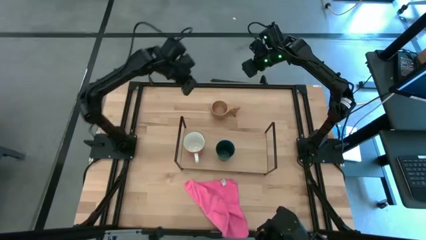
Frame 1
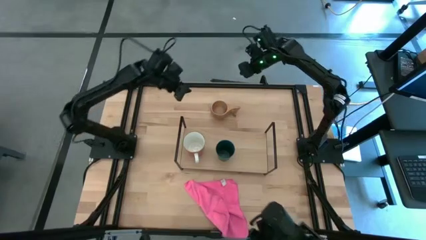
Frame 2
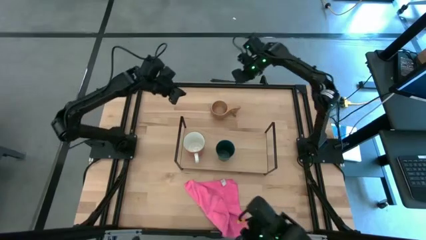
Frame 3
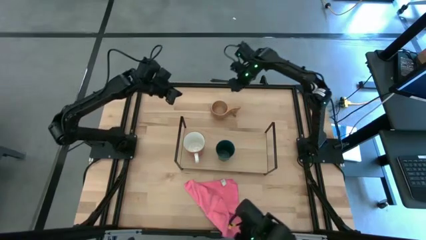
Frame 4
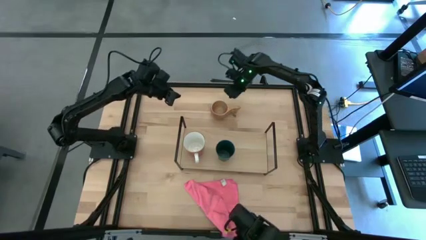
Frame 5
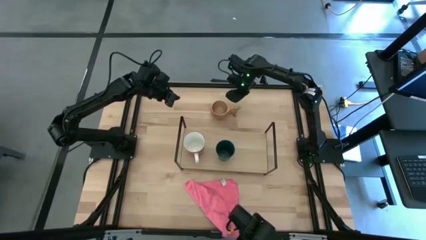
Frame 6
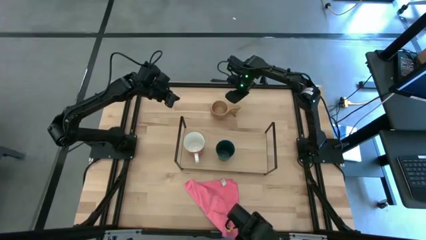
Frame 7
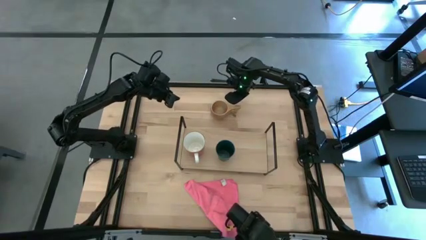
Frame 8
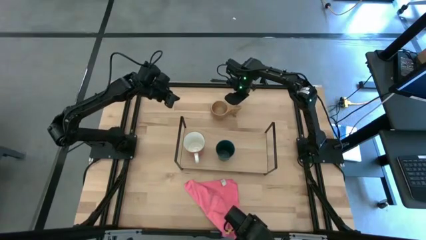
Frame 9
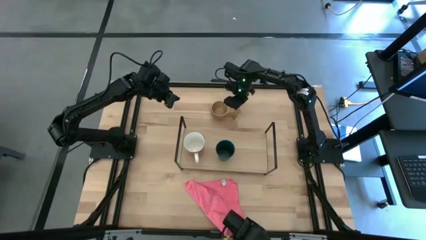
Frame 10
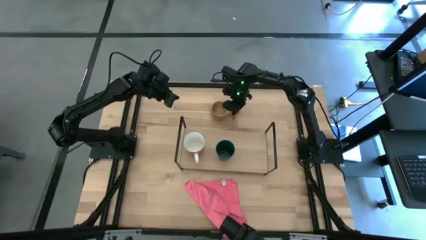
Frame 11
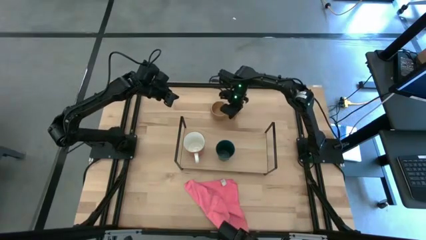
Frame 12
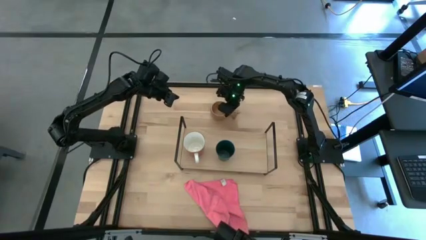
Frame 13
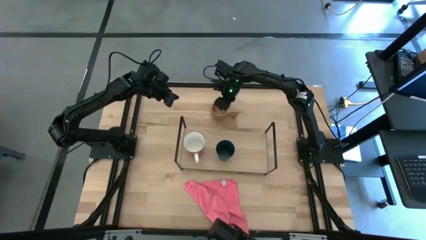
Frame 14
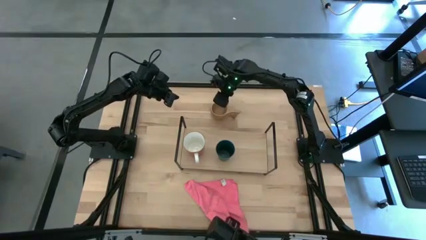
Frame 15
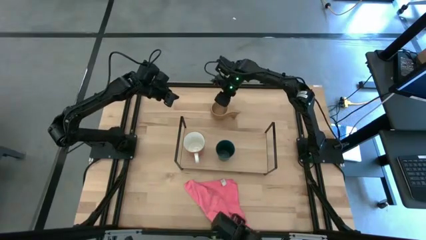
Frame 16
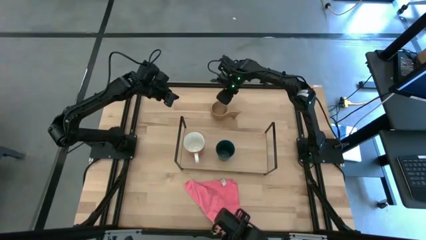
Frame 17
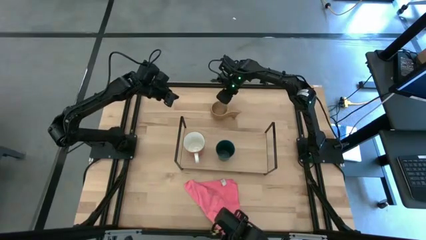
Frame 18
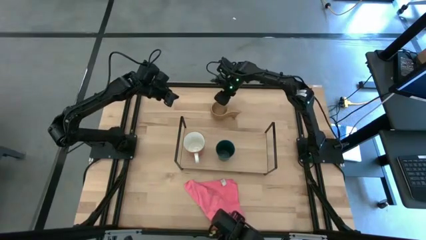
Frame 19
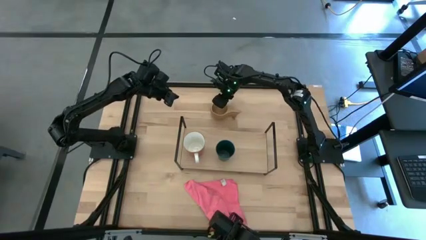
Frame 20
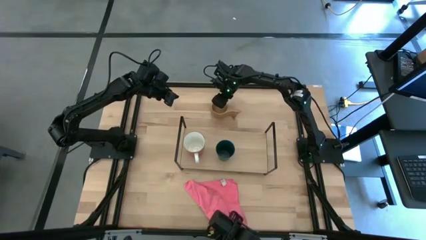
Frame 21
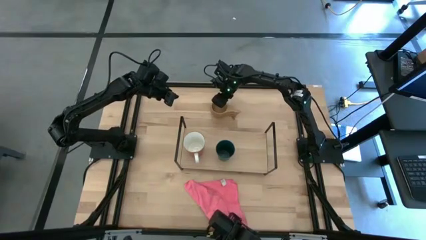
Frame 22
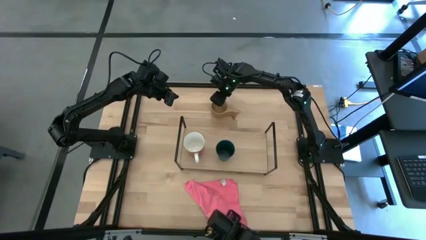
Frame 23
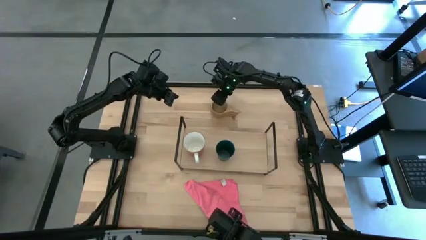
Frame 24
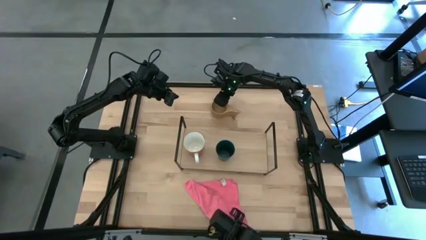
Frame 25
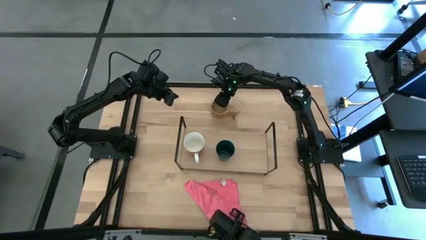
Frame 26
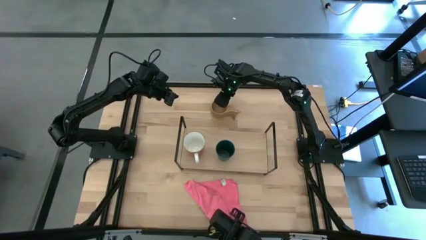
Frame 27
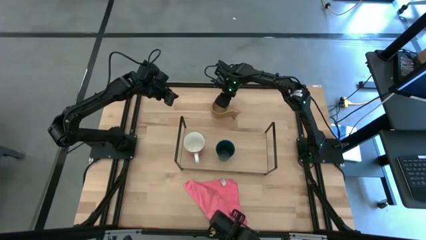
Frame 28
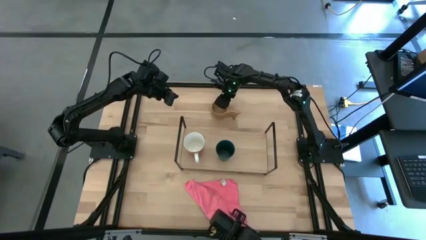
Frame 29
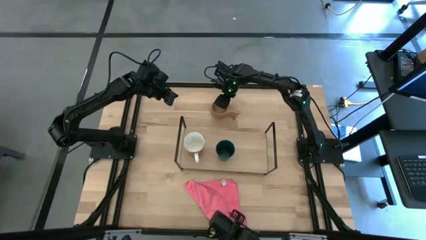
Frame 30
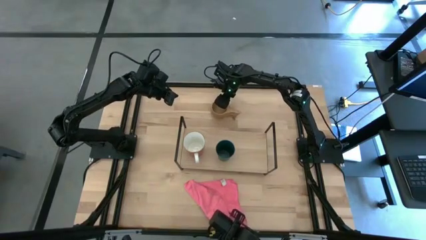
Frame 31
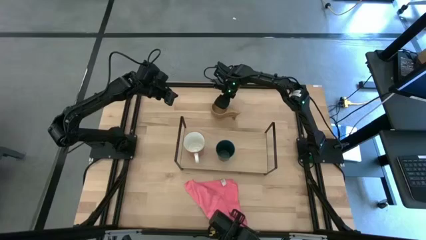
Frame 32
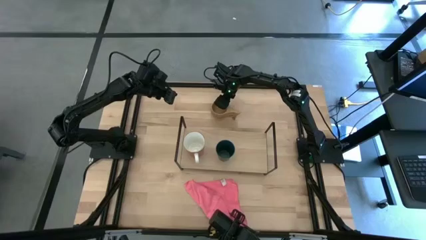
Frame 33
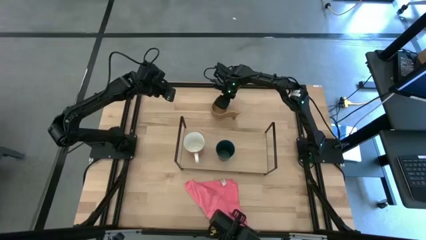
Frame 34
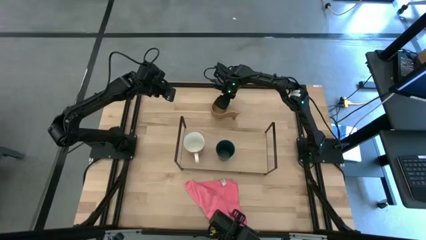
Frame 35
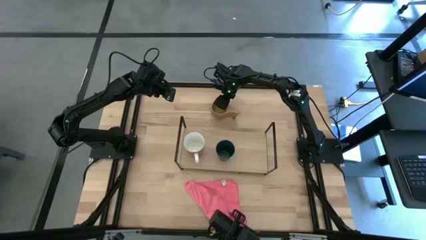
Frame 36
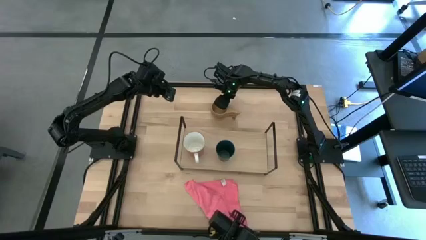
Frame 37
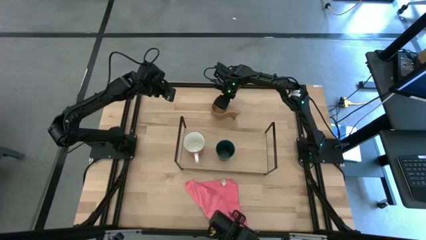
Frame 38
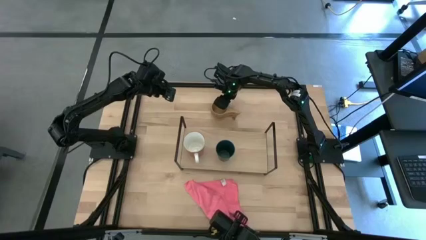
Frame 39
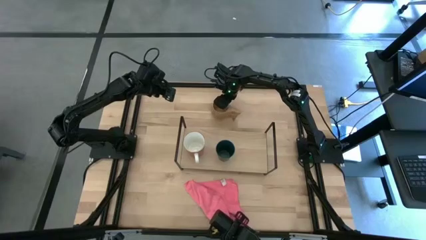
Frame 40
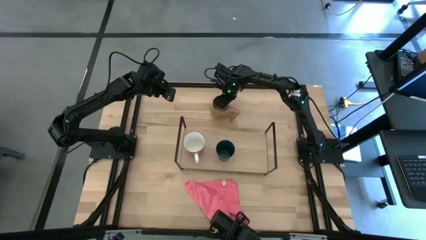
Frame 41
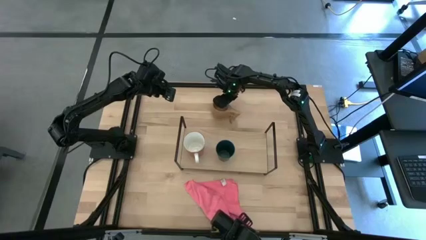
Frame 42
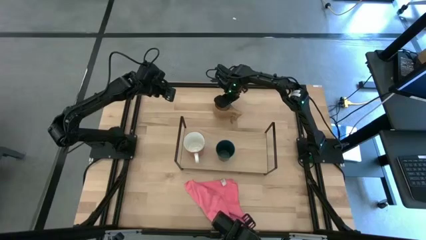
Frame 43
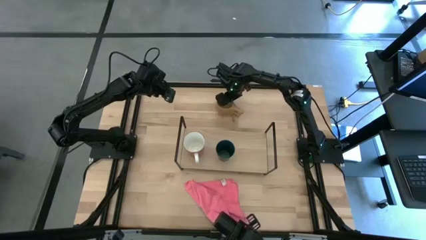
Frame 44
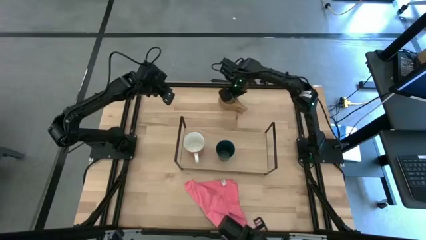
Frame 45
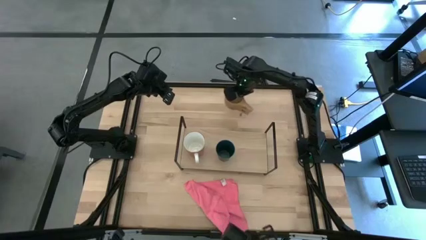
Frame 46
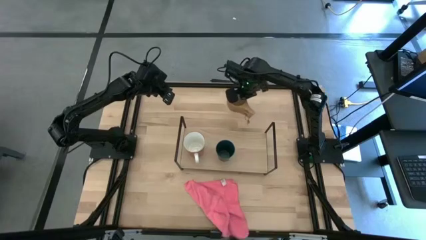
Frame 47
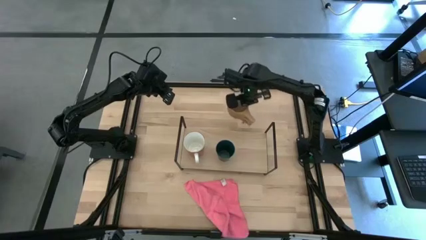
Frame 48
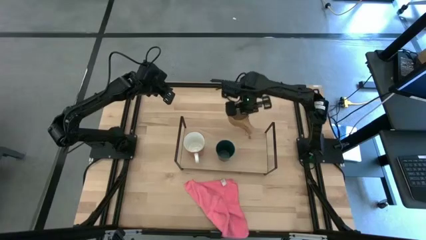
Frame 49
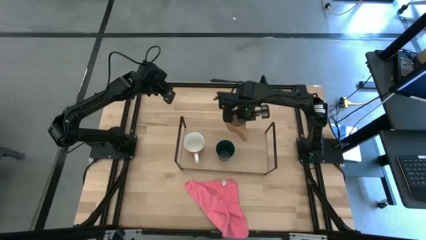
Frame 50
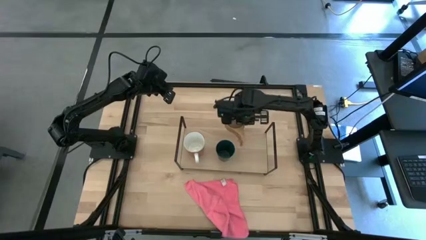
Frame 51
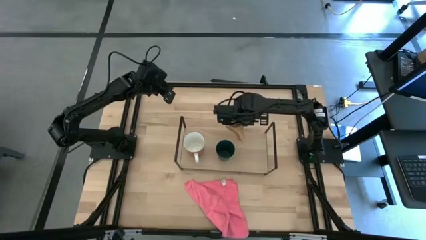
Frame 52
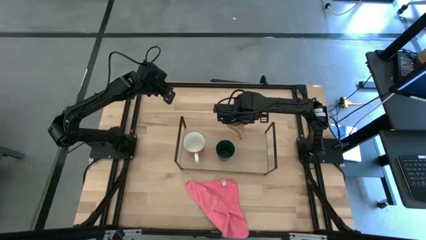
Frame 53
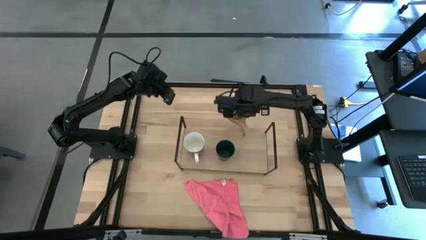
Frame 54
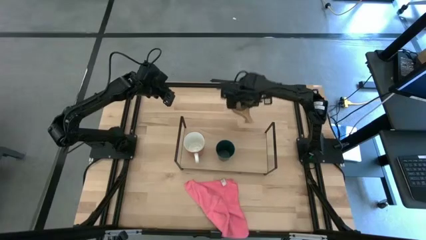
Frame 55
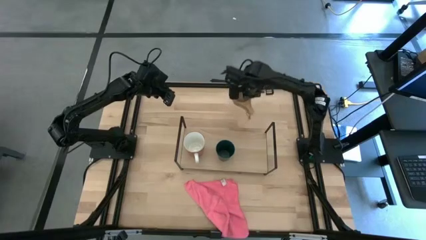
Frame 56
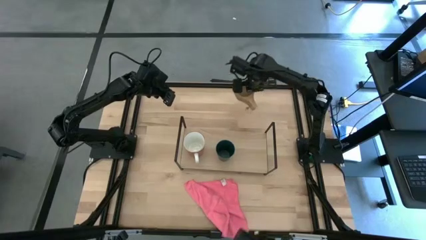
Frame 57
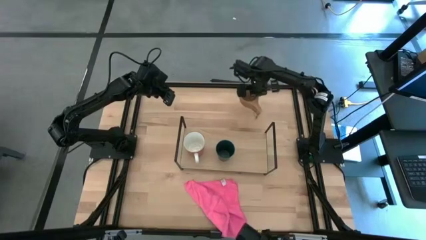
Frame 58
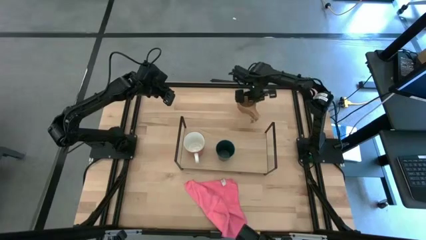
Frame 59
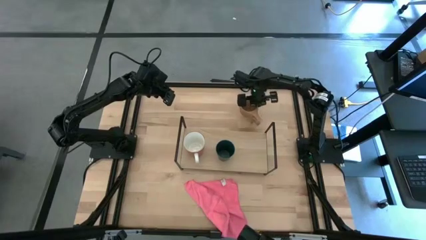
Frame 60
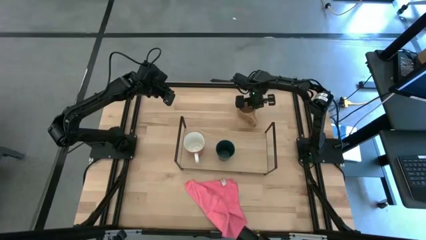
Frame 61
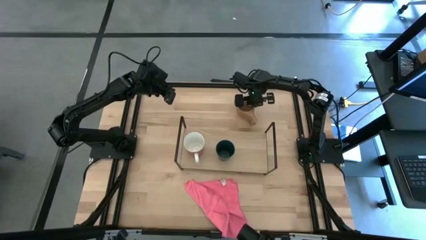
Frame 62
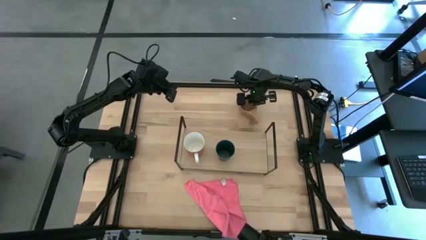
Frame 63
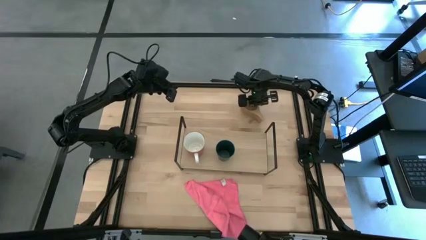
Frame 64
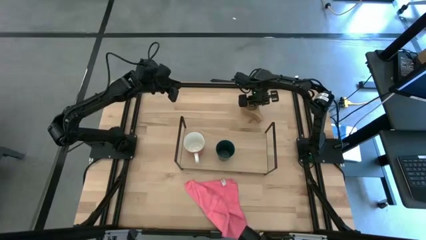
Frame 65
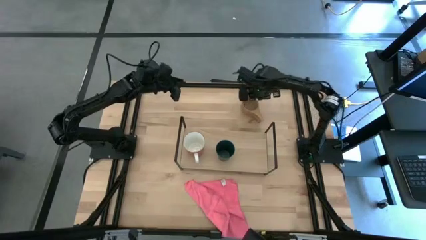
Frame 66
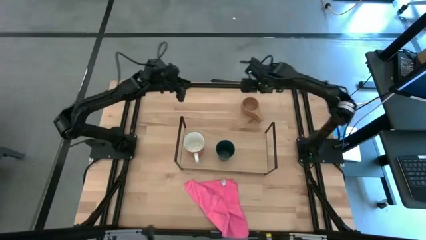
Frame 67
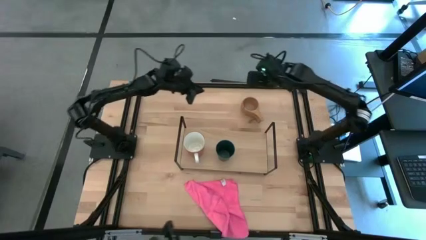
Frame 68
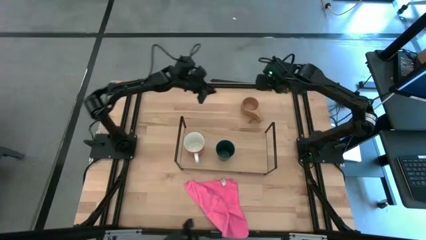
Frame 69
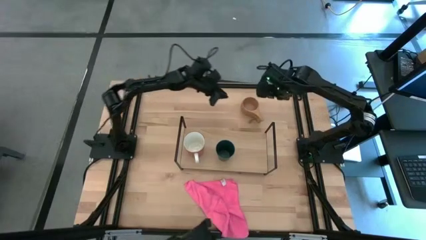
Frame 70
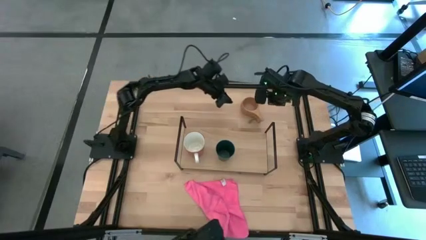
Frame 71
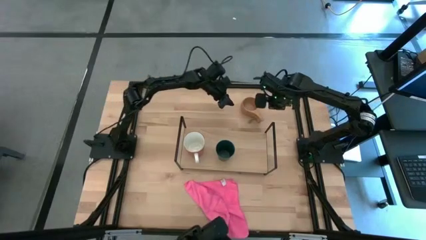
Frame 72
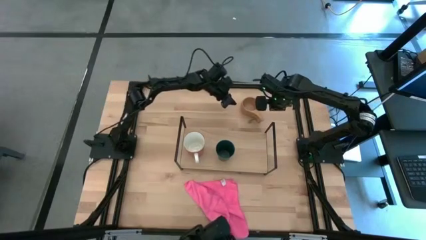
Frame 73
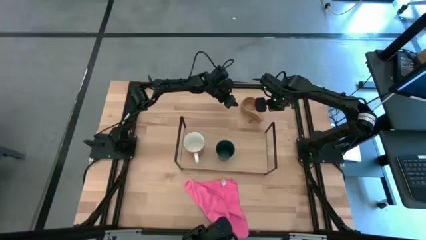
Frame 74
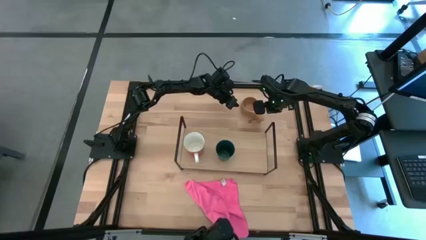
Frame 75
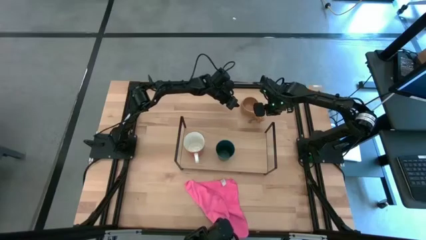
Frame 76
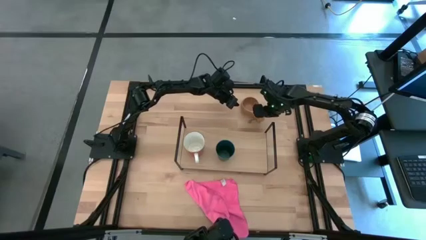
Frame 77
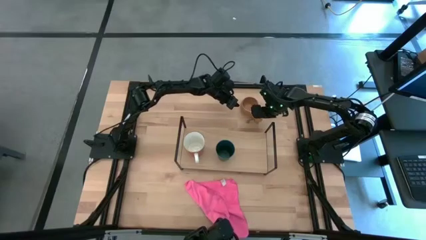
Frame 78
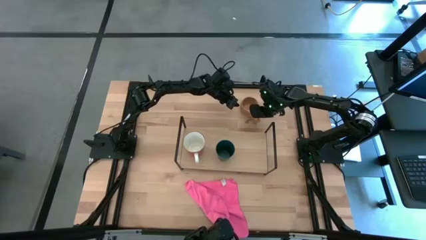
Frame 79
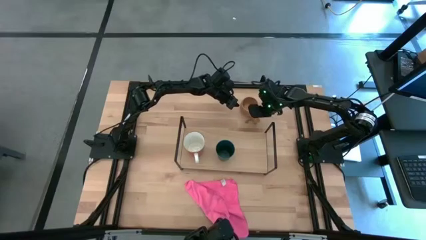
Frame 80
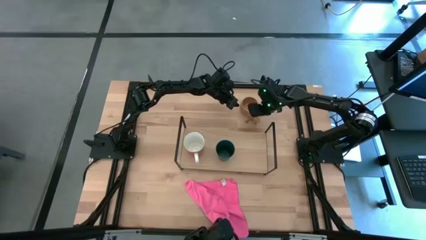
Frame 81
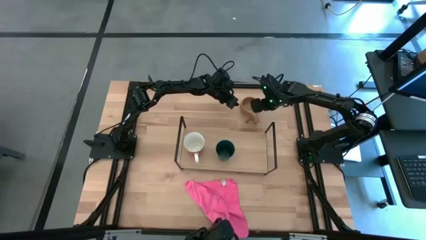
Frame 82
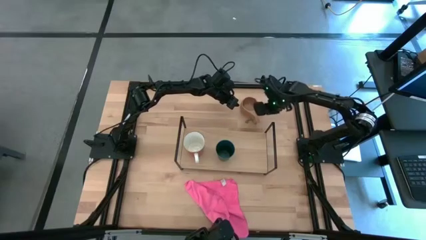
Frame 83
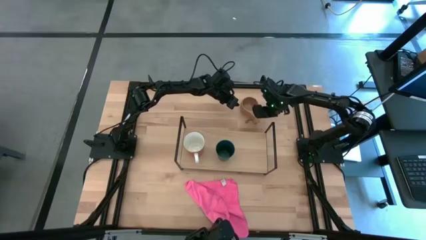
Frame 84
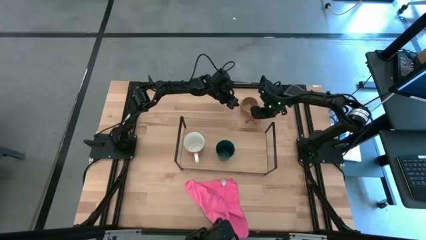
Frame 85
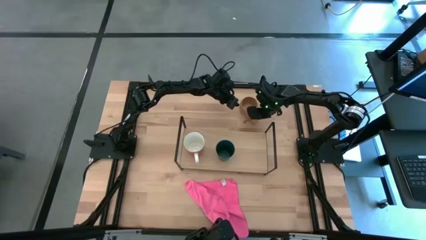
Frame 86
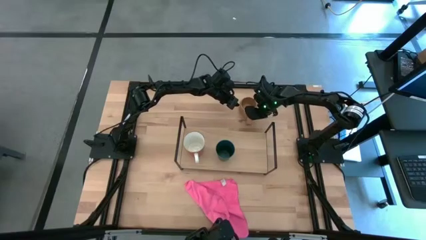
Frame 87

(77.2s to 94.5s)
Task: Stack small to large cups/mugs on shelf
Move wooden mug from the bottom to the top
